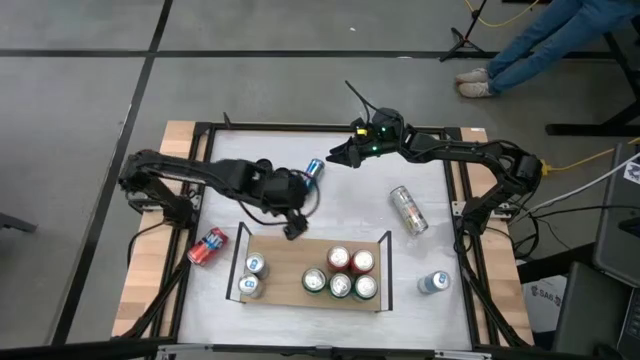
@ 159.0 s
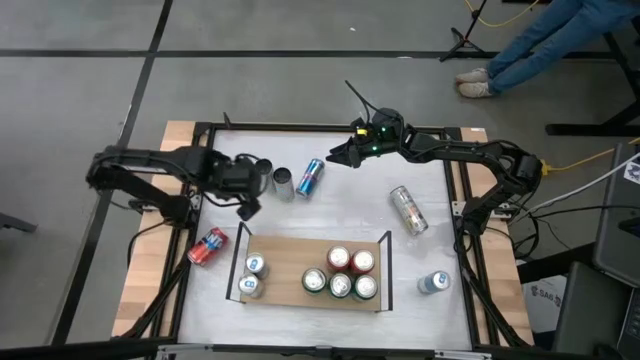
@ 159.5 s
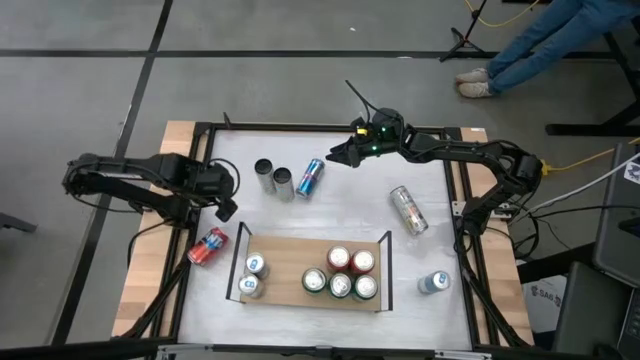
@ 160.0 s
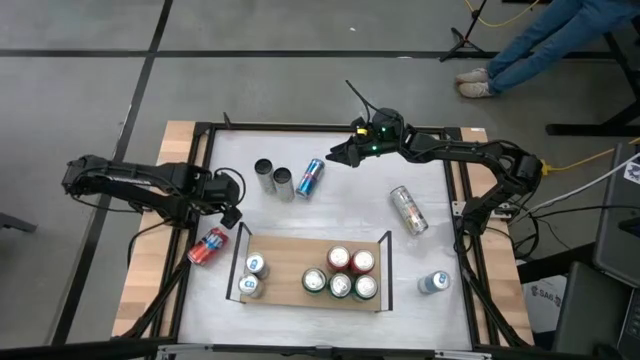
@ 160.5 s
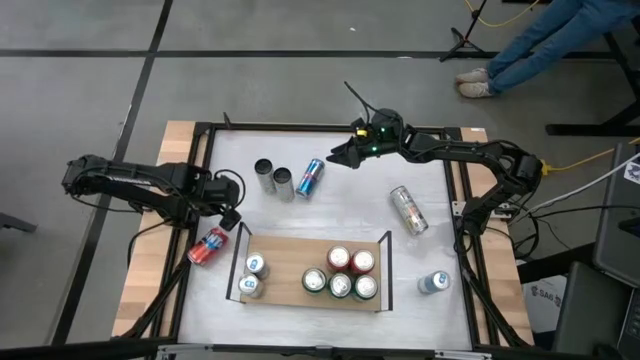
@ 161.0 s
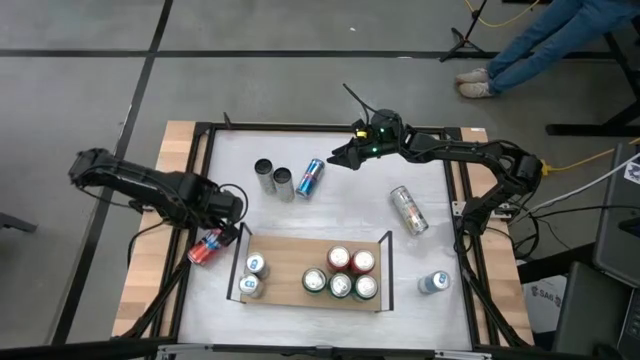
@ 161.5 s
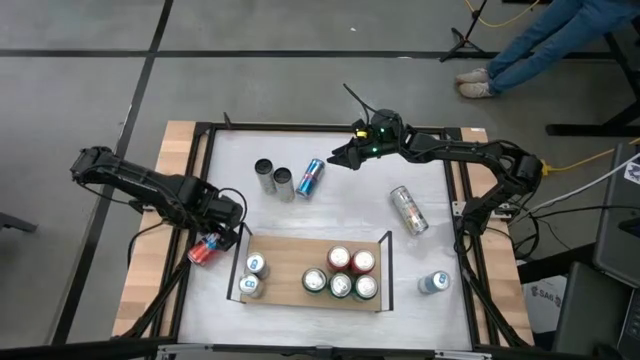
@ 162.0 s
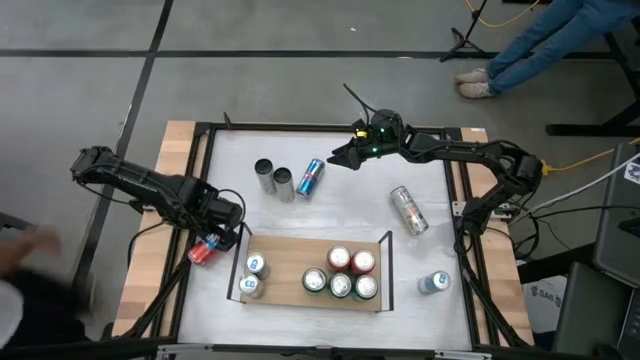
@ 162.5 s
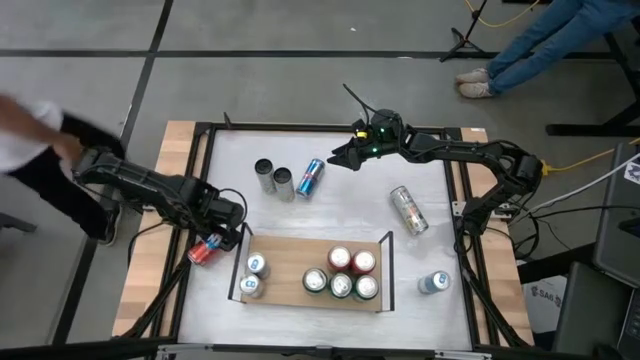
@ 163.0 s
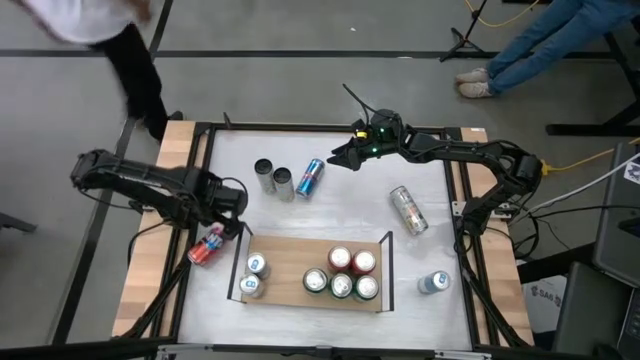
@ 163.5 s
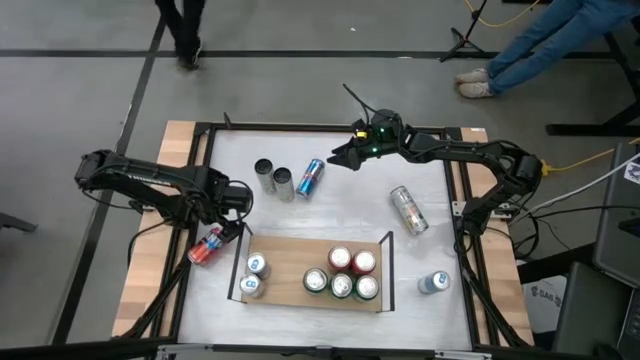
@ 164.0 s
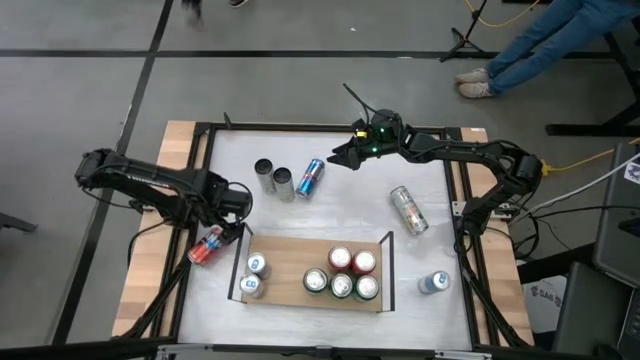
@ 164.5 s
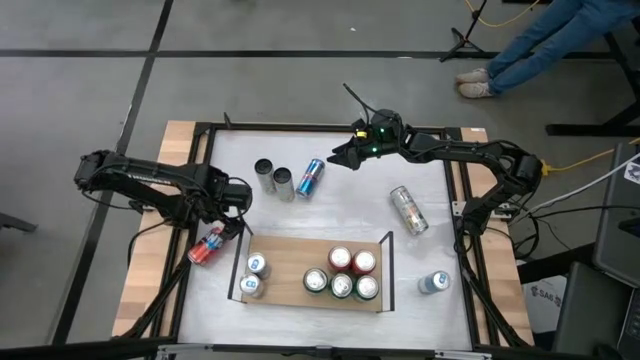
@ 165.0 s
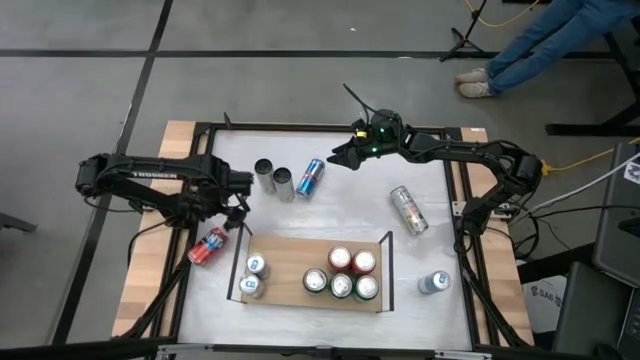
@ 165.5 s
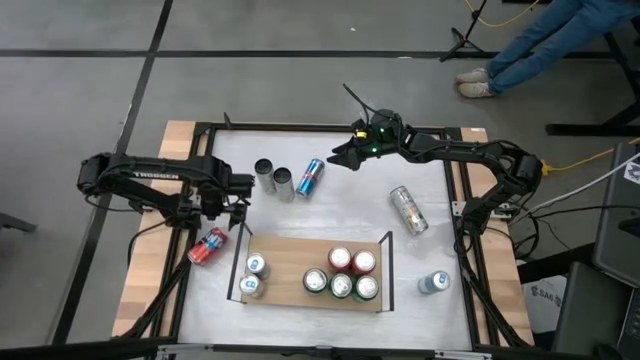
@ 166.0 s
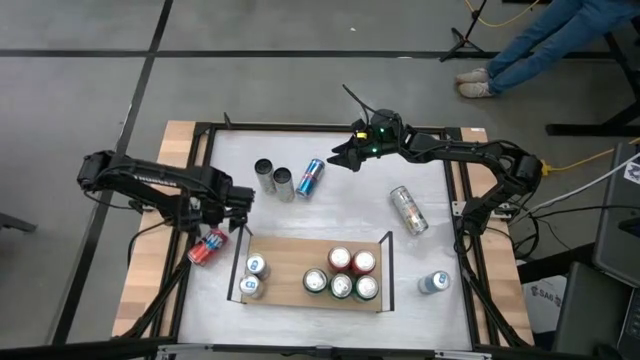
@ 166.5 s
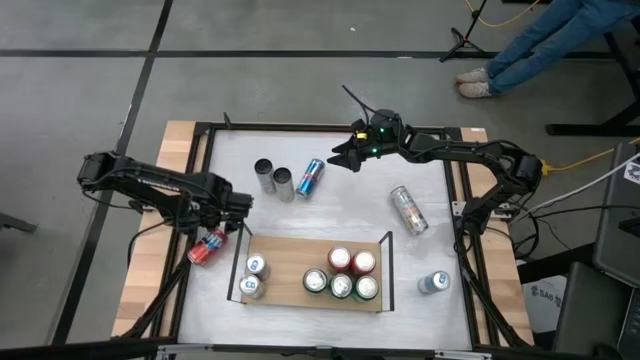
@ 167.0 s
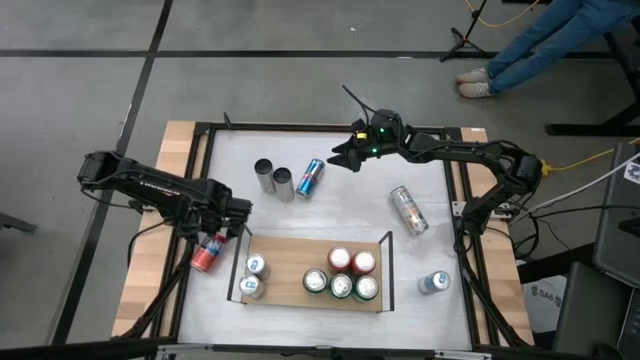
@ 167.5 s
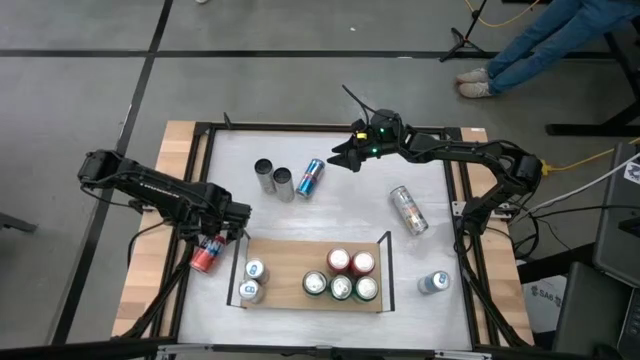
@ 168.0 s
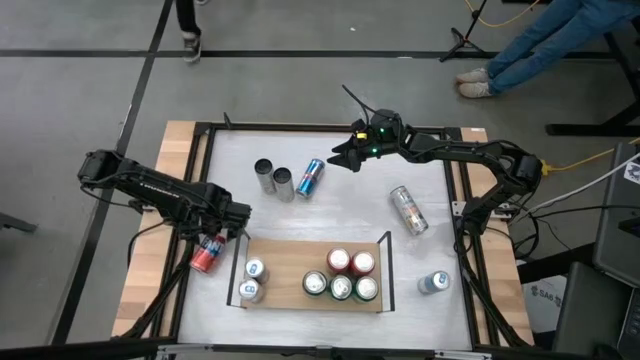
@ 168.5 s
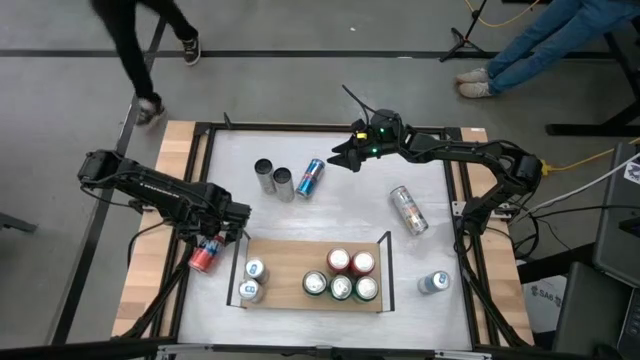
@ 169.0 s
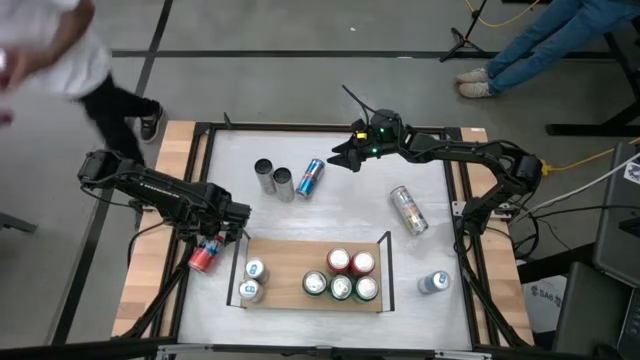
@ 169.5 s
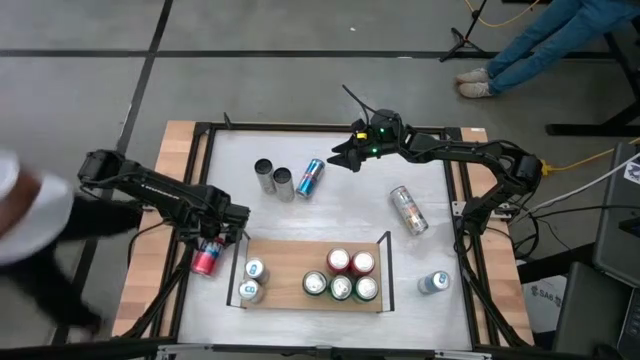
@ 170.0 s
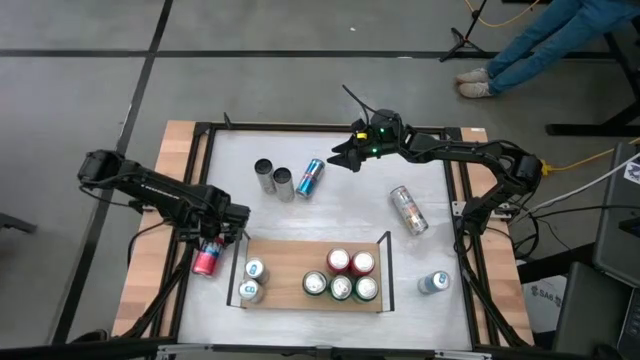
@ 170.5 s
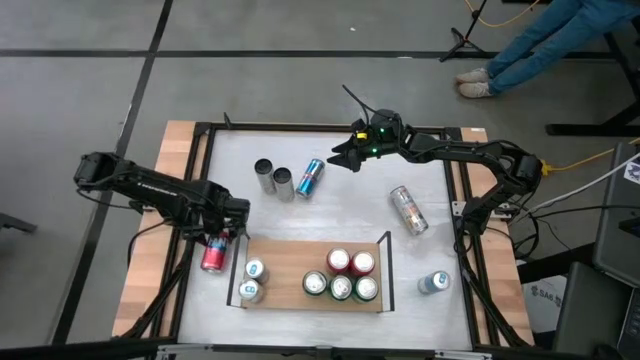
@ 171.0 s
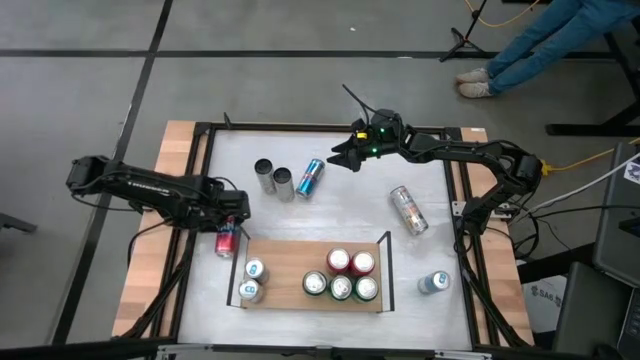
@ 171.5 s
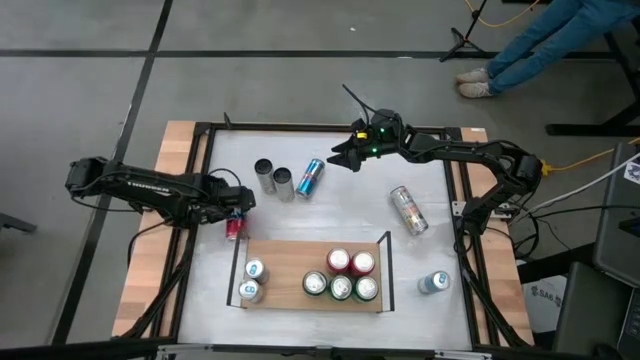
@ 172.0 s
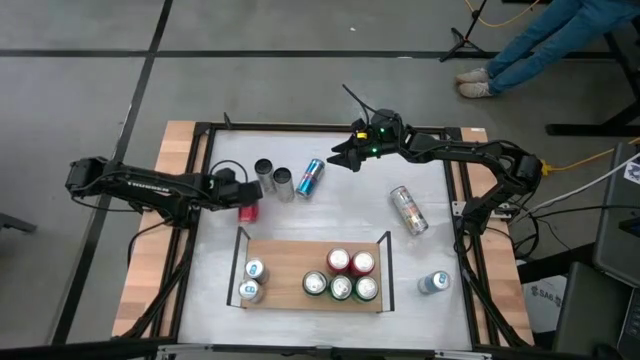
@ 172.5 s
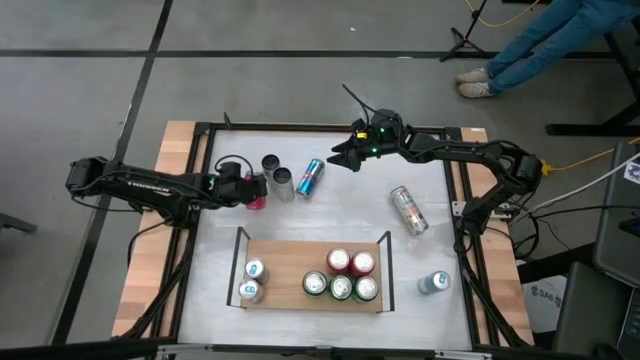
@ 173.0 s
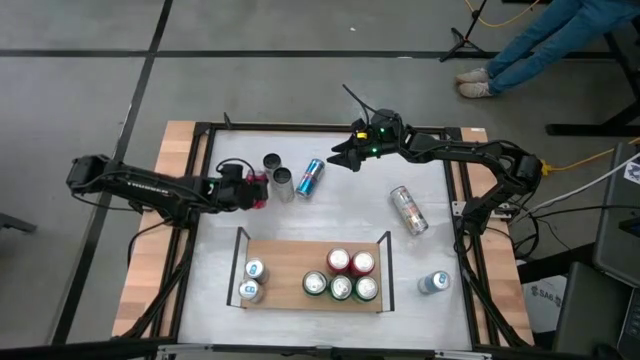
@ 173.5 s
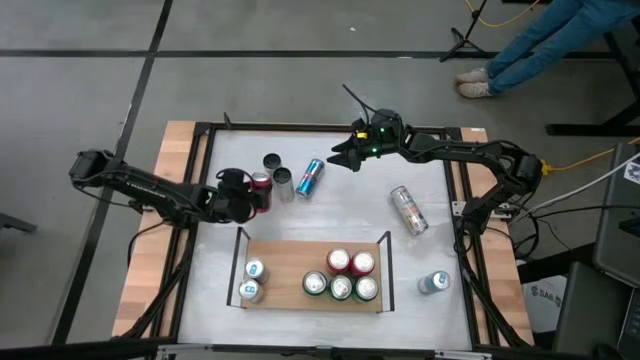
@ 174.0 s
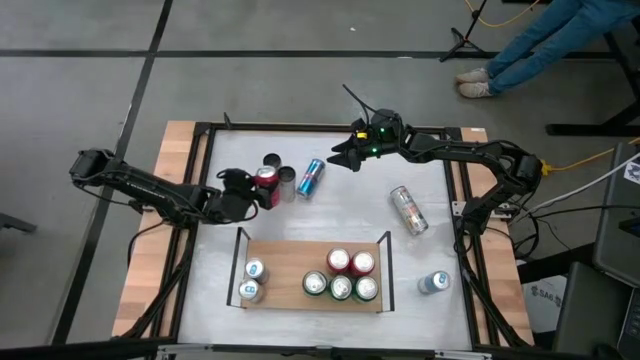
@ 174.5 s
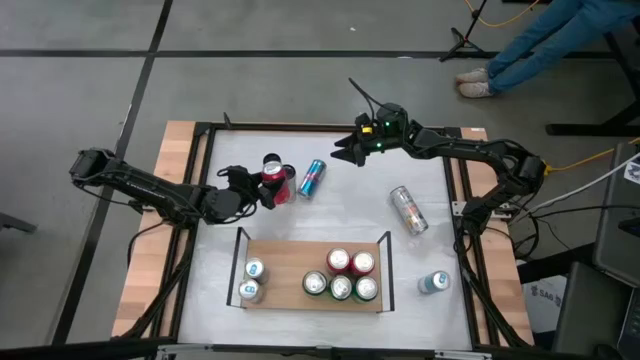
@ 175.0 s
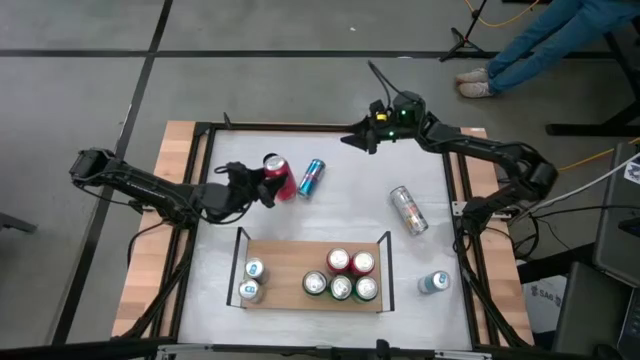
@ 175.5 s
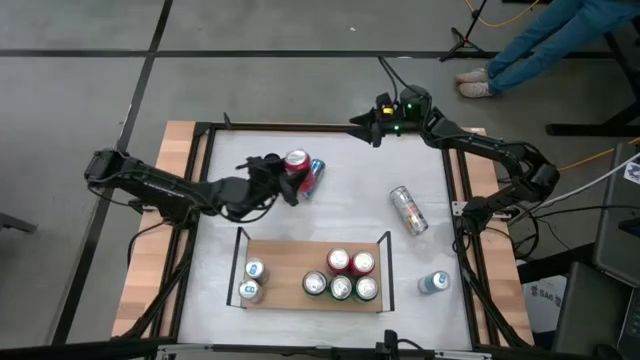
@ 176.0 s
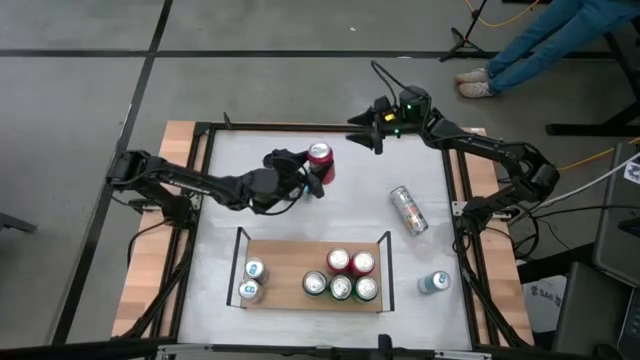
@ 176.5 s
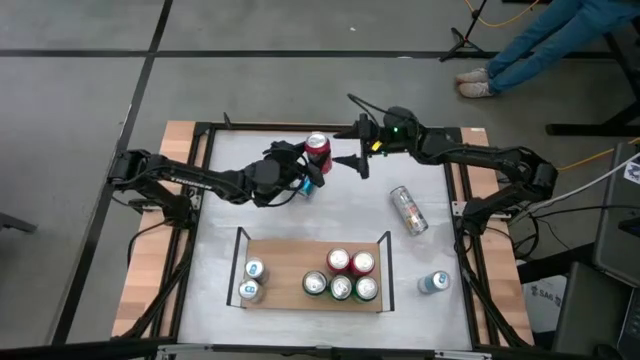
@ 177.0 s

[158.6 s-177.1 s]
Task: Place canned beverage on shelf
Put the red soda can on the shelf aligned with the other red soda can

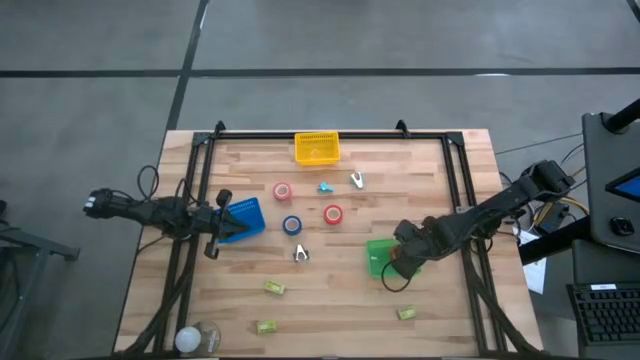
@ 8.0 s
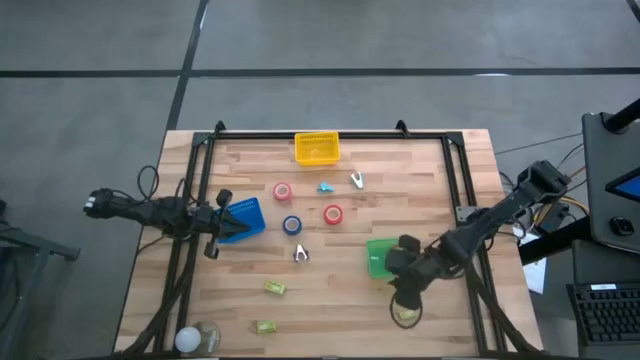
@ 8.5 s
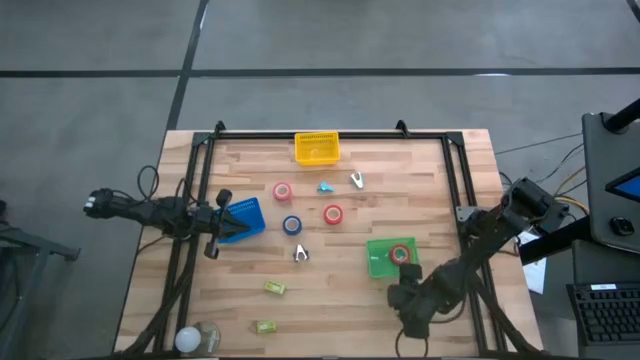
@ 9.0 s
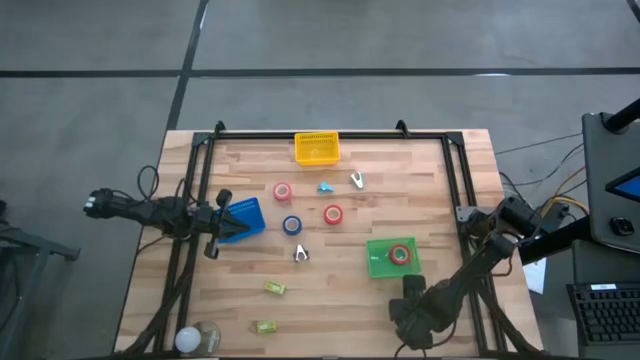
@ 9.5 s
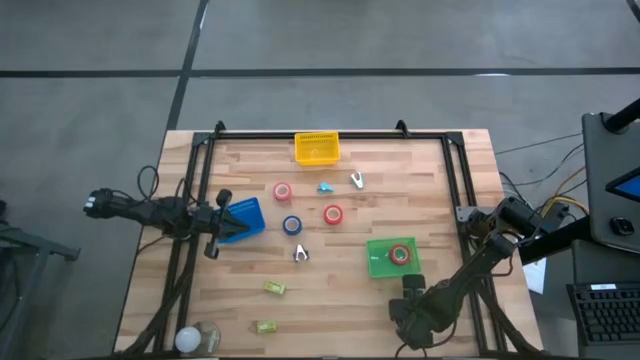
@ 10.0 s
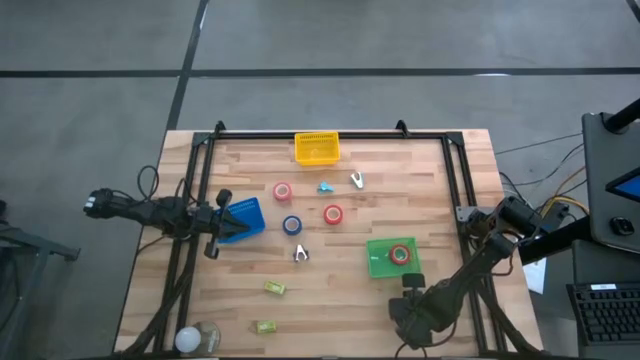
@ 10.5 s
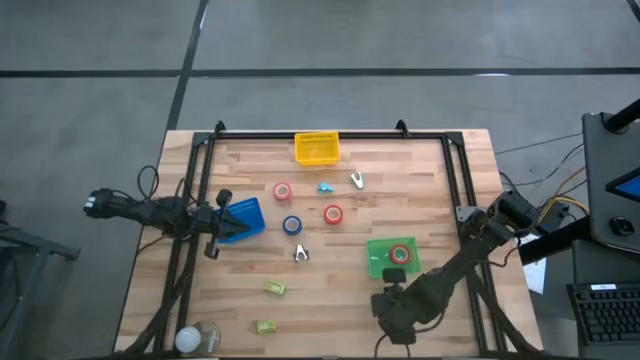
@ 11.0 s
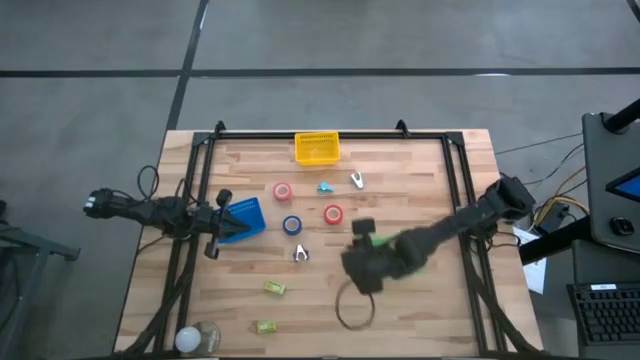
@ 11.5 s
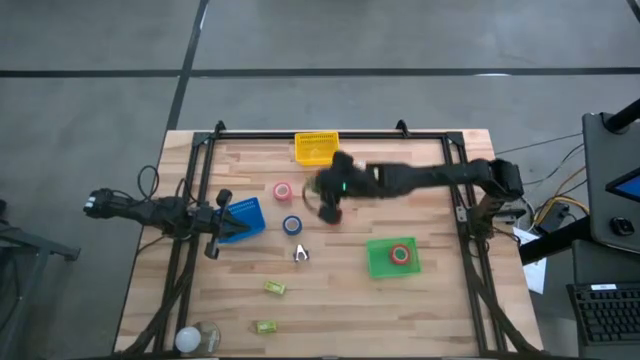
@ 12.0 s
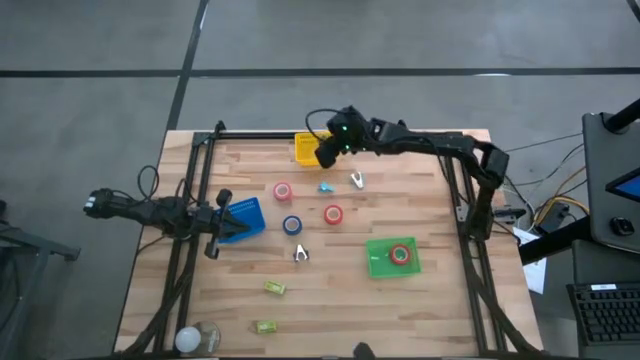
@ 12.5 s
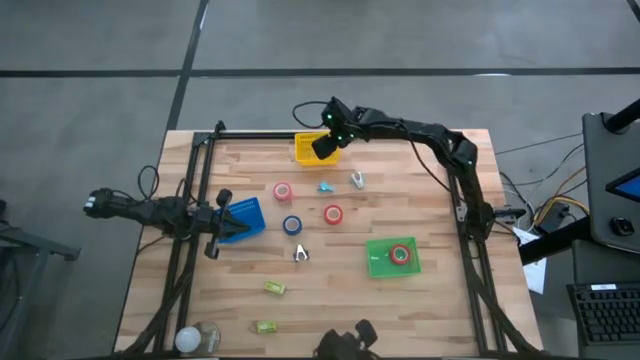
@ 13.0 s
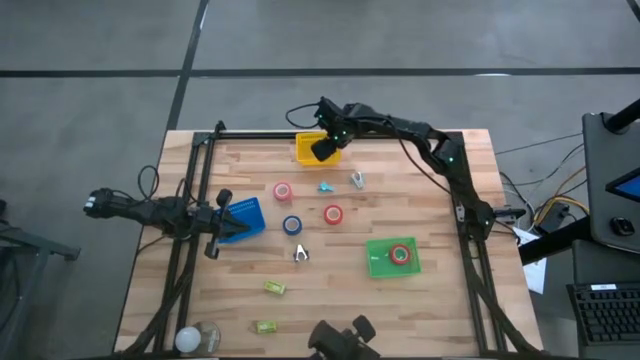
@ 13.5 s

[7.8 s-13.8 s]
Task: Pick and place Stapler, Stapler remover, tape
Put the bottom right green staple into the yellow bin
